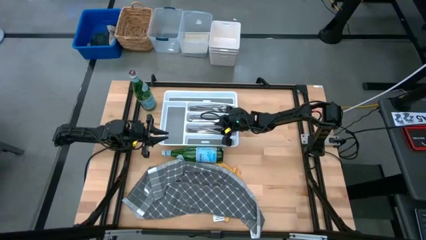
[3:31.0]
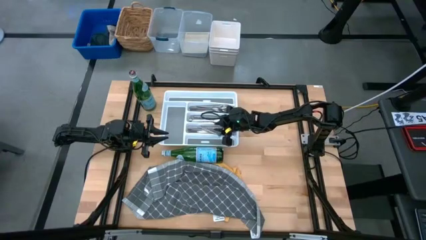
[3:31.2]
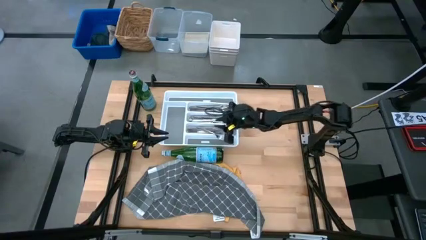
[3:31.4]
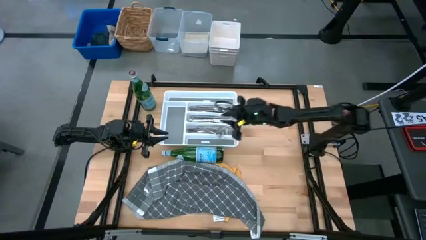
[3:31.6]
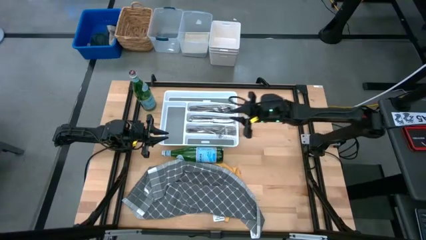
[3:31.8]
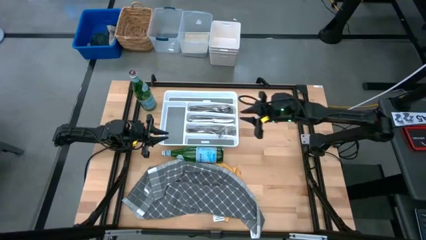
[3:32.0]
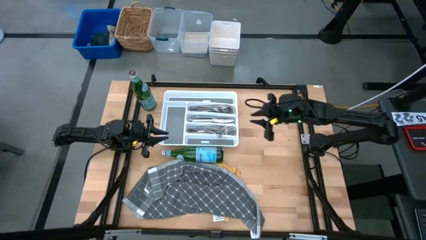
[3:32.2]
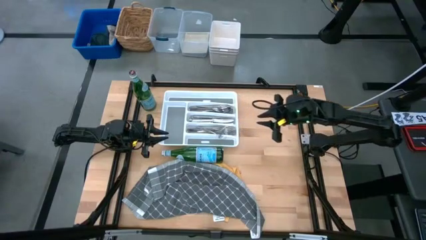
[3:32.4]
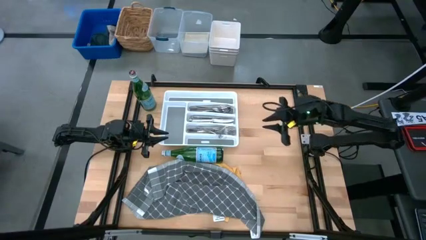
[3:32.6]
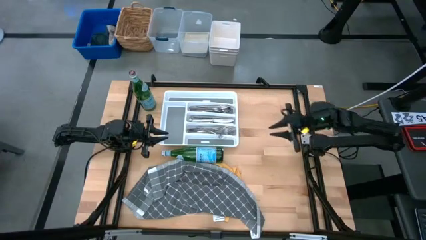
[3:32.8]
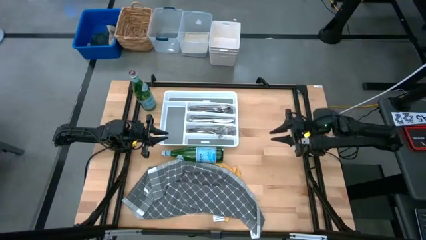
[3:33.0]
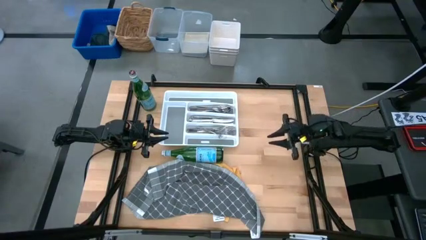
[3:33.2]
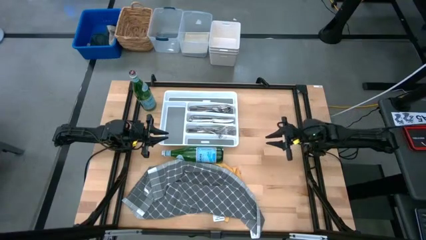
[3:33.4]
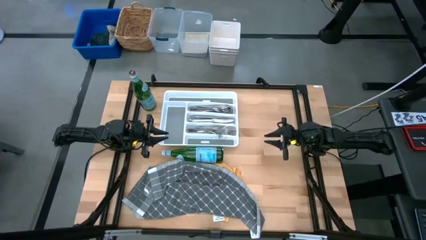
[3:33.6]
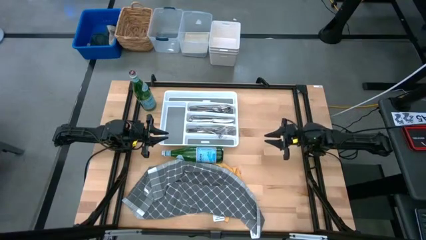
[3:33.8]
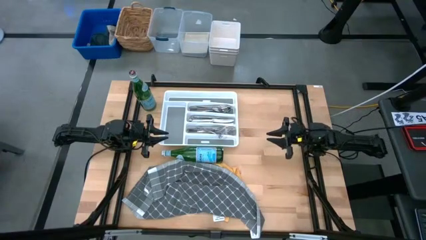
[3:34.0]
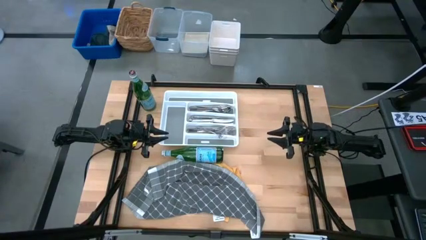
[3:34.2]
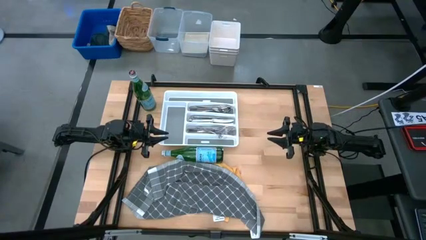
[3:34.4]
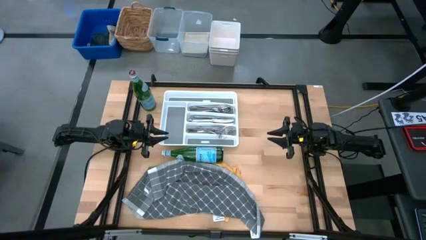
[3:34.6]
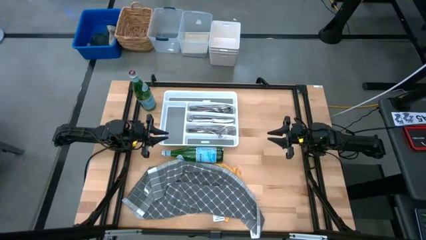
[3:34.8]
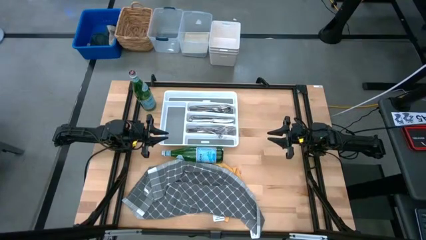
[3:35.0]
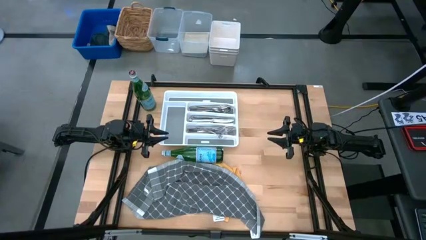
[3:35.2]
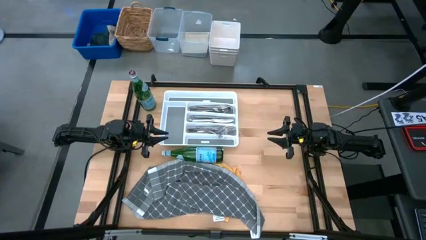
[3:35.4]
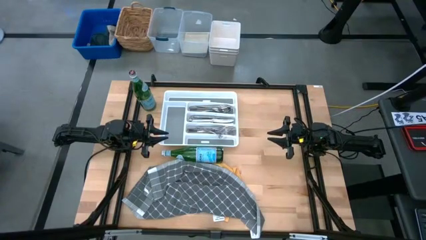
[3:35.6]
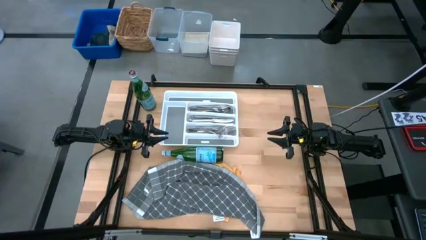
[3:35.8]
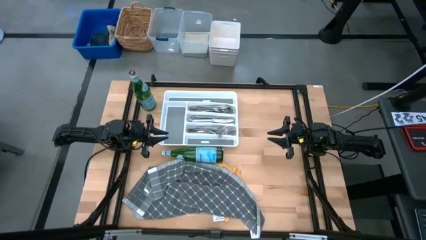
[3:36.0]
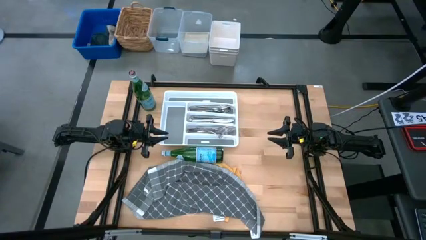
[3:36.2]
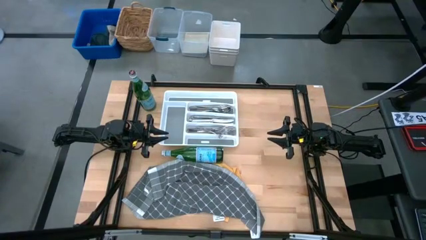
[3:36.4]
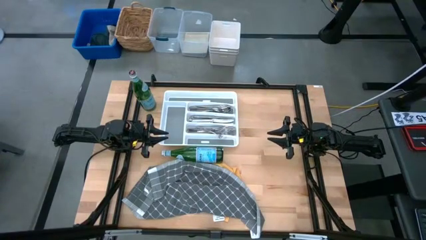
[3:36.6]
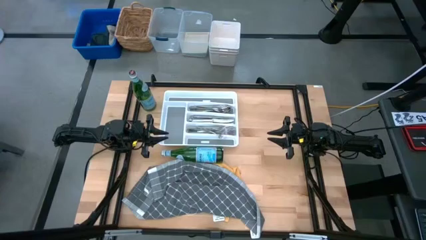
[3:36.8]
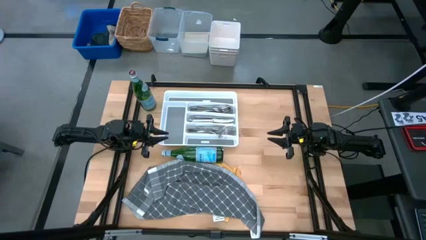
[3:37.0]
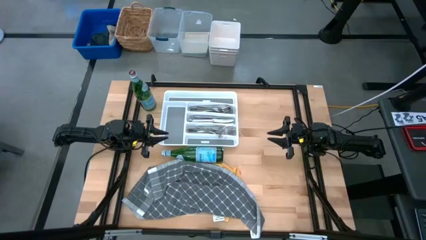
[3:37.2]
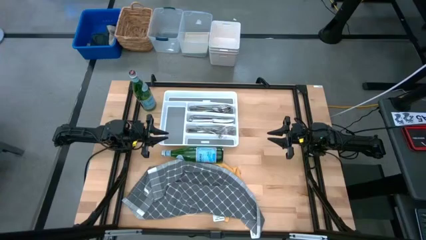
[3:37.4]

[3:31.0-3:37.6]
Task: Sort silverware
Return to Home Position

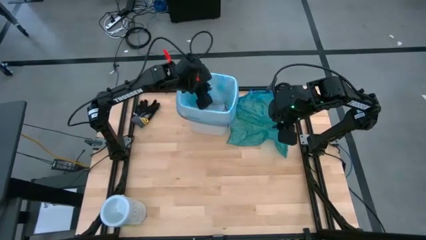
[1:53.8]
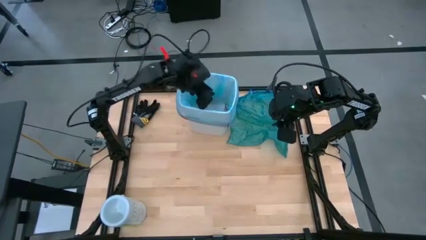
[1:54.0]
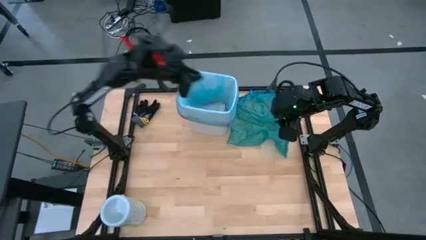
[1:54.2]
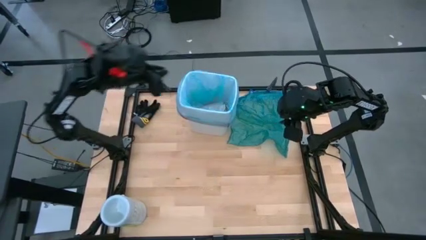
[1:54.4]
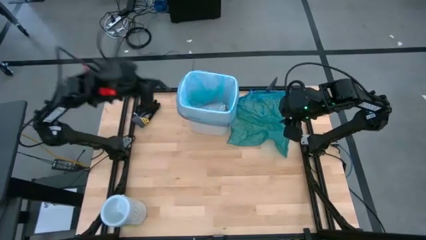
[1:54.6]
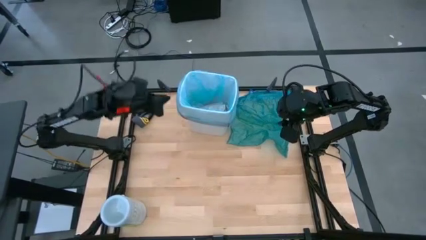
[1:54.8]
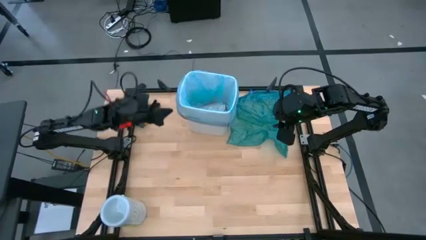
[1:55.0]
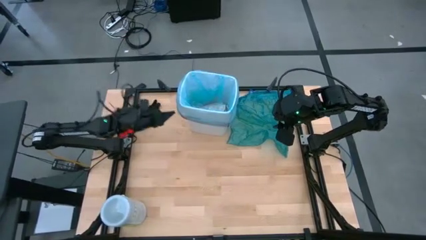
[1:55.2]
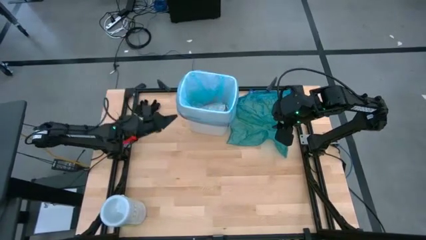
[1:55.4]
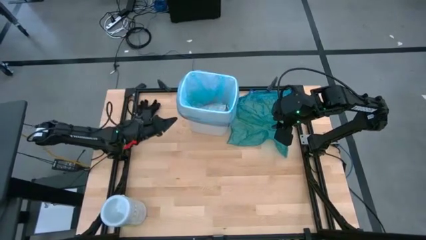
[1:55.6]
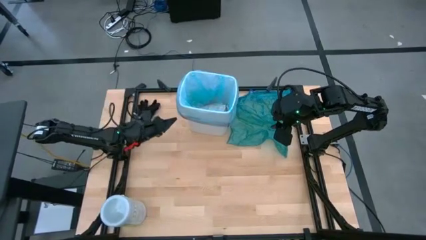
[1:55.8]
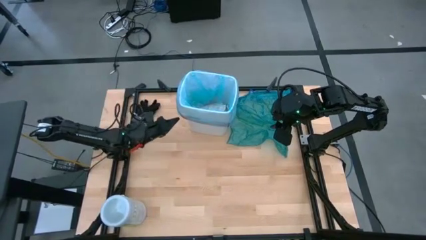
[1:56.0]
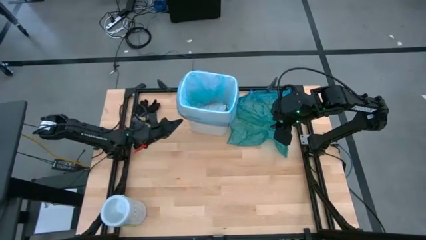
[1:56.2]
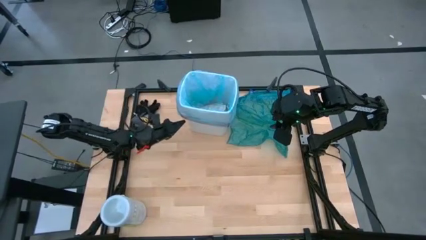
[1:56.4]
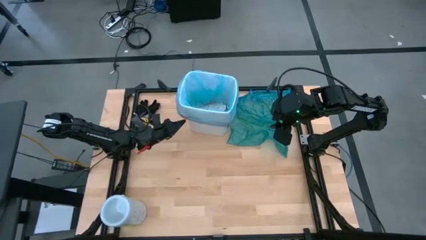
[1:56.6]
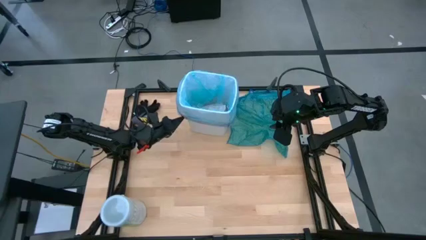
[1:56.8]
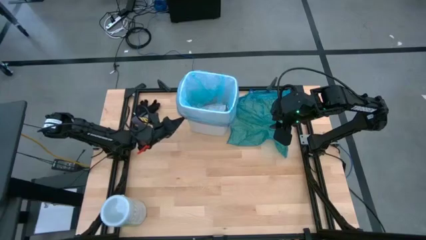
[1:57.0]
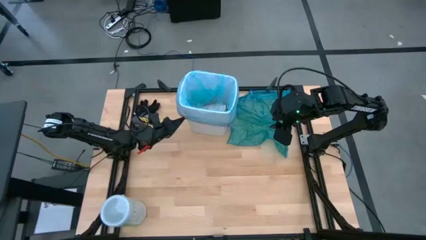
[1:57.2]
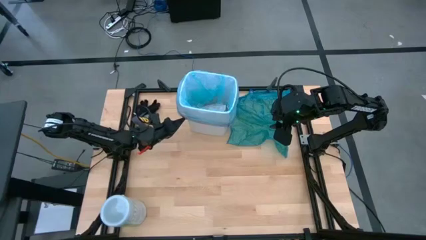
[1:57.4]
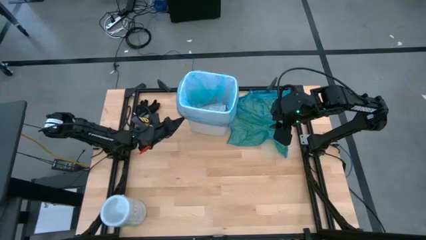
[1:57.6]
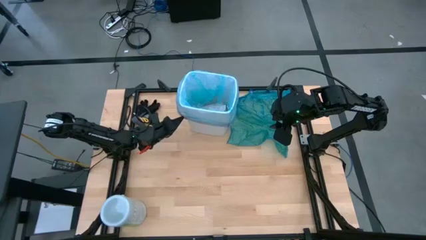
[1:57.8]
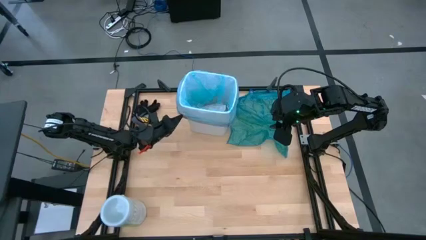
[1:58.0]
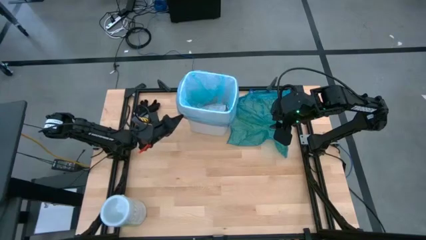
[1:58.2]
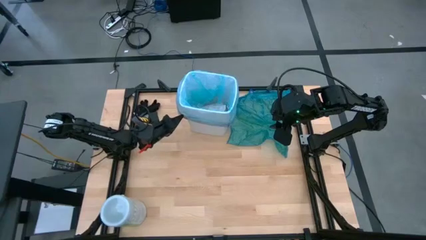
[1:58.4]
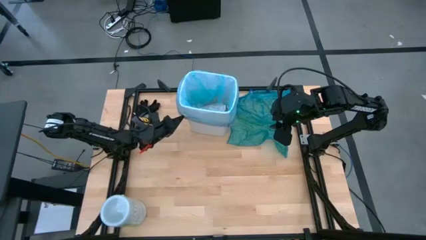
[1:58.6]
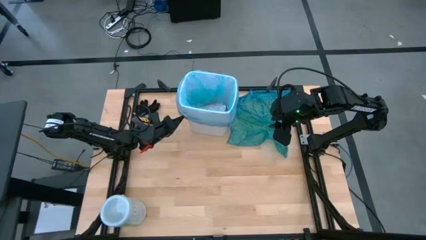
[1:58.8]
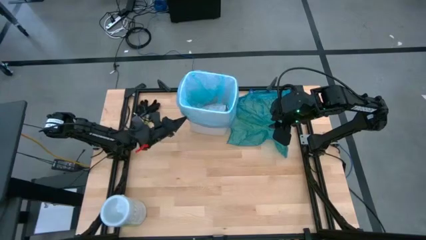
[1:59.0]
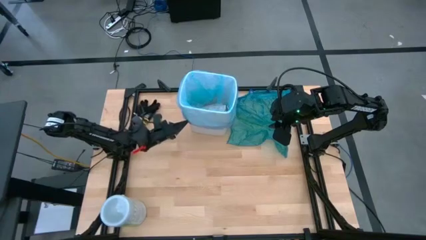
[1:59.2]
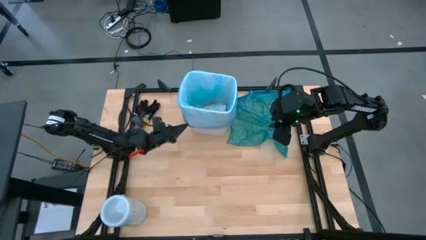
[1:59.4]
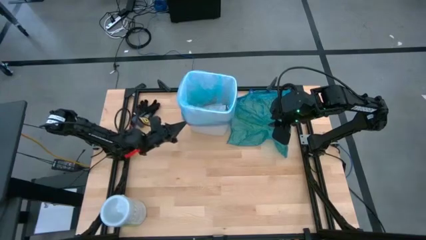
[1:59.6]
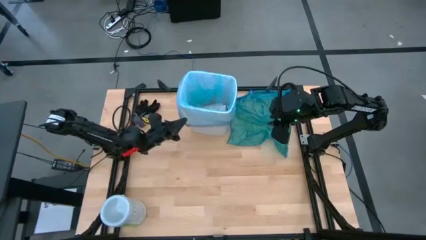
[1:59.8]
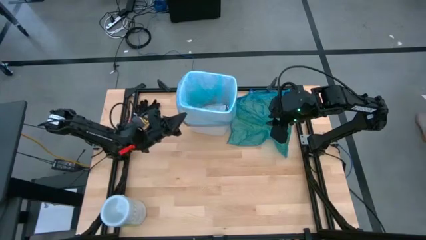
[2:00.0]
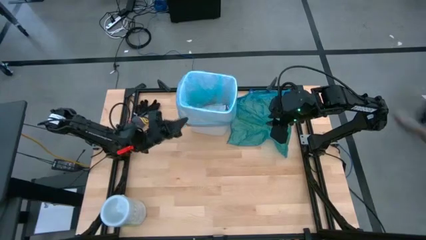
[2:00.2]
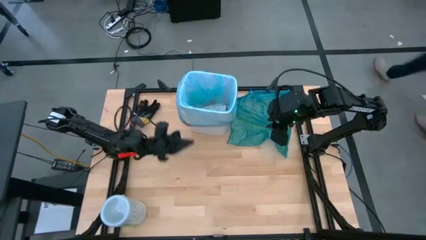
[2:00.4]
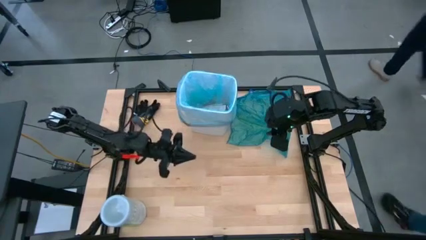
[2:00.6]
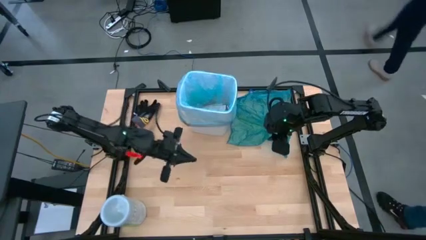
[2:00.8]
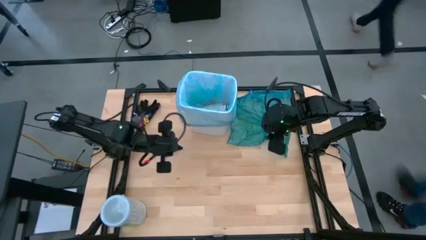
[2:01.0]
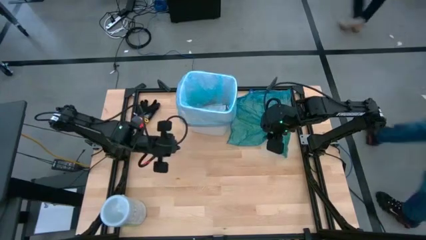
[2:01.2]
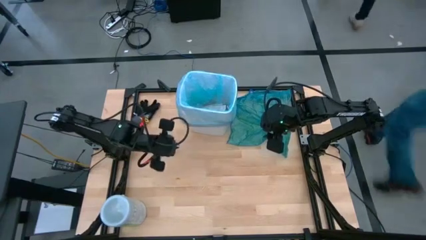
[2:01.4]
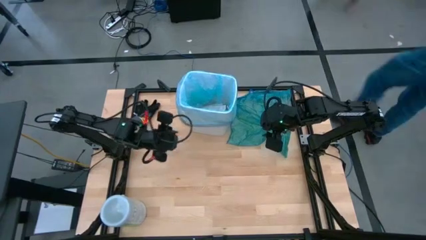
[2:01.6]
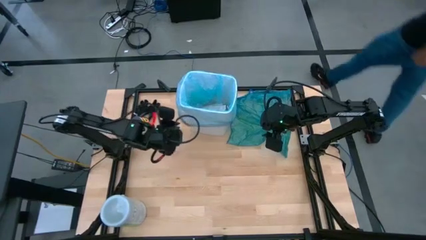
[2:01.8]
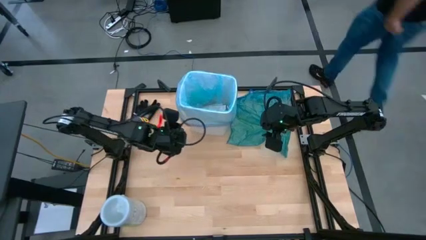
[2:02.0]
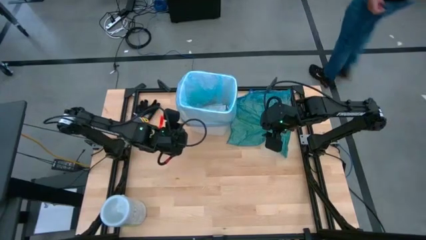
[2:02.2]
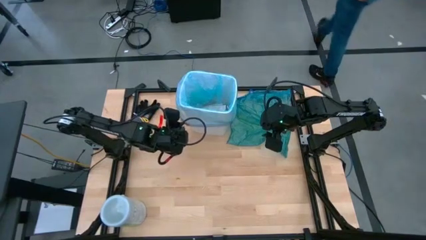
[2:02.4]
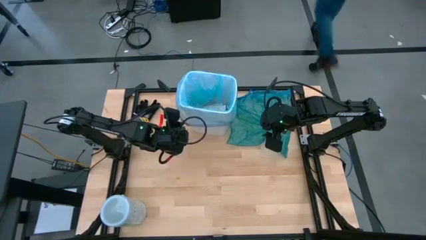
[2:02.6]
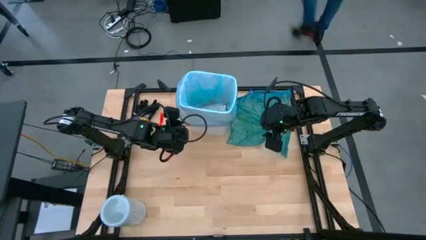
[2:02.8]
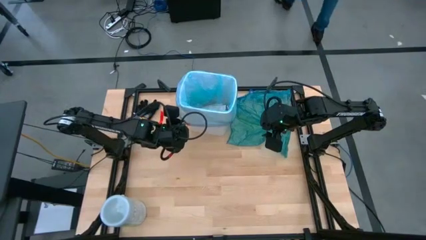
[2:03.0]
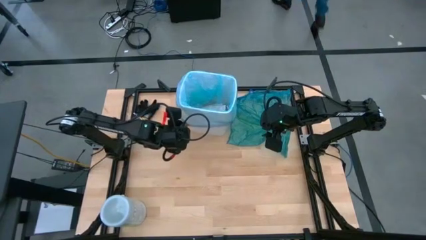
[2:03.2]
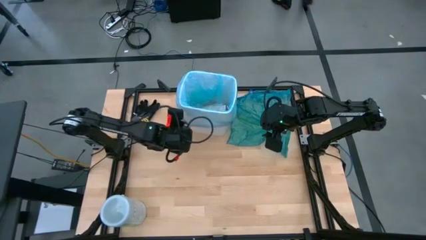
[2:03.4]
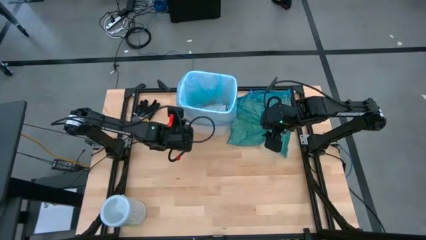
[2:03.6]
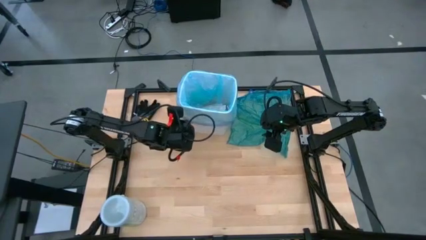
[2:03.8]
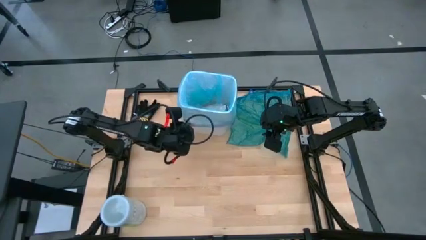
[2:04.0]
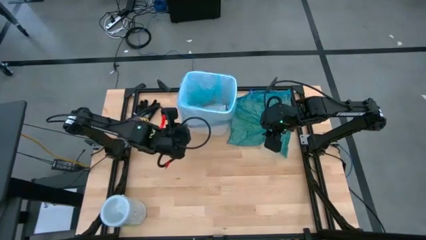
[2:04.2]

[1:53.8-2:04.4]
Task: place trash/remove bag and relplace
Remove the blue plastic trash bag from the trash bin
